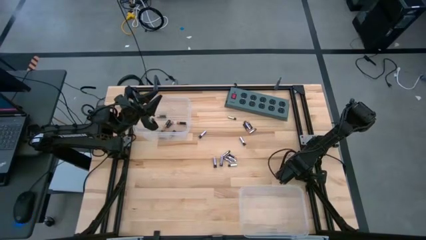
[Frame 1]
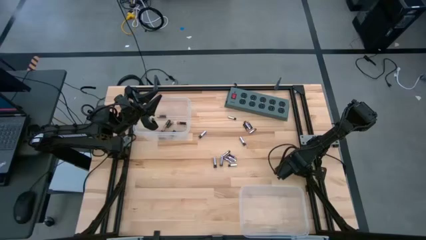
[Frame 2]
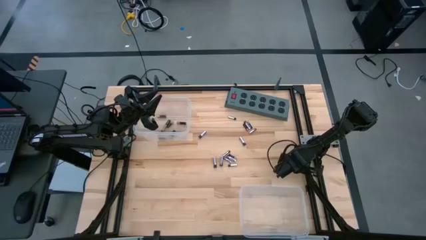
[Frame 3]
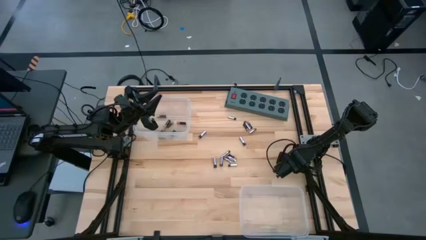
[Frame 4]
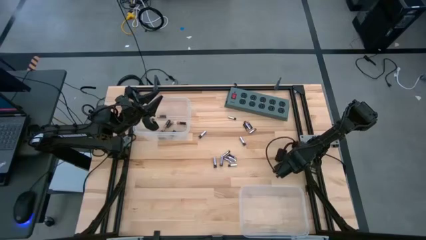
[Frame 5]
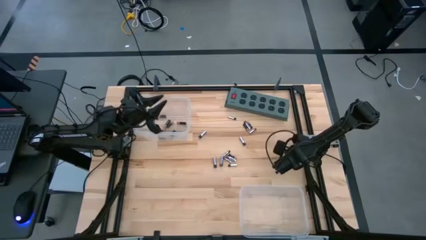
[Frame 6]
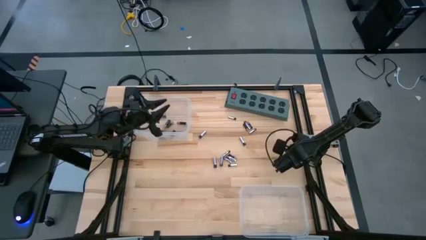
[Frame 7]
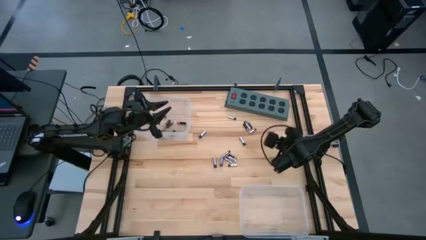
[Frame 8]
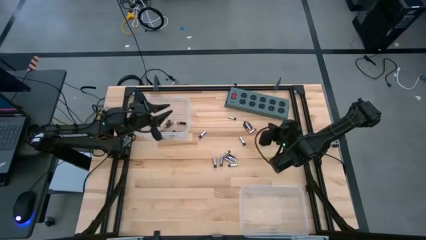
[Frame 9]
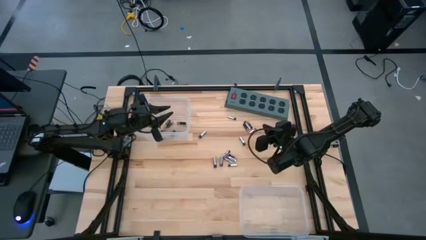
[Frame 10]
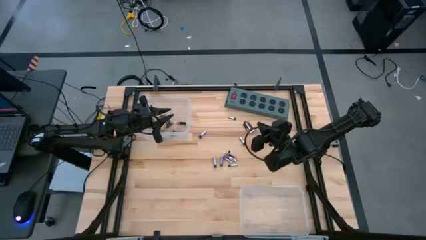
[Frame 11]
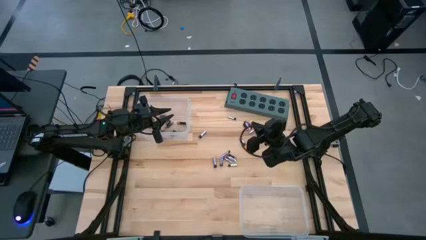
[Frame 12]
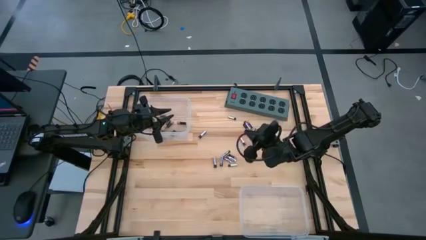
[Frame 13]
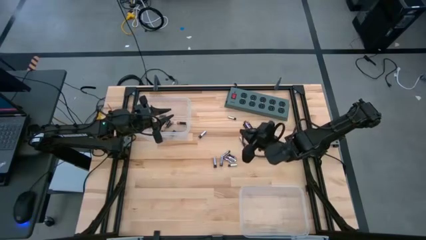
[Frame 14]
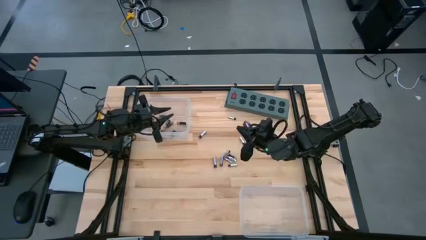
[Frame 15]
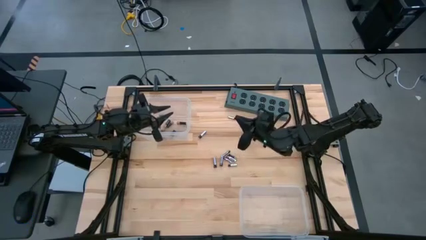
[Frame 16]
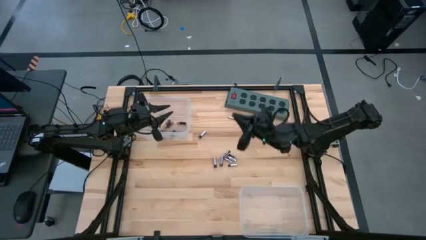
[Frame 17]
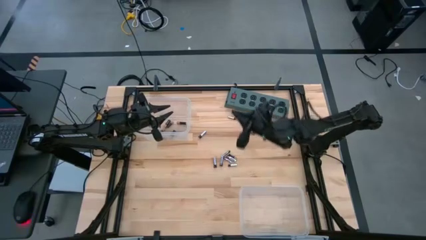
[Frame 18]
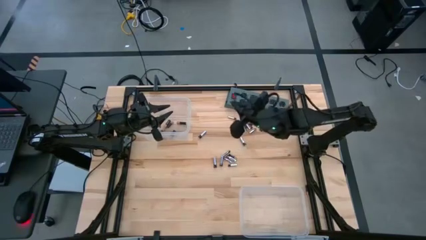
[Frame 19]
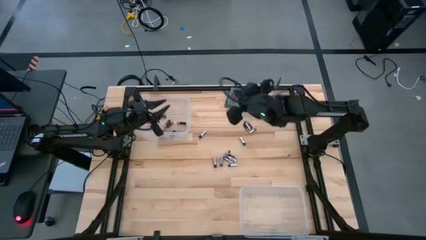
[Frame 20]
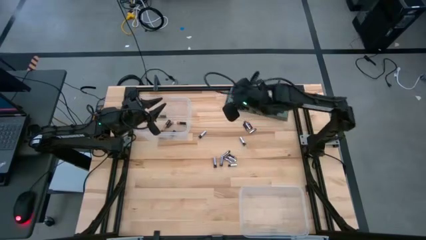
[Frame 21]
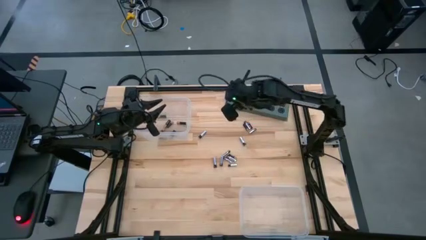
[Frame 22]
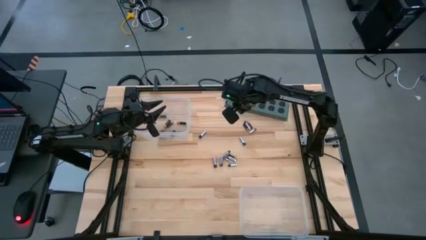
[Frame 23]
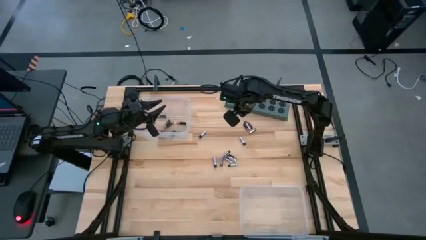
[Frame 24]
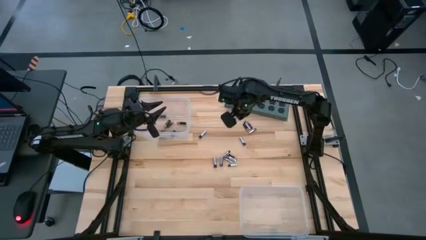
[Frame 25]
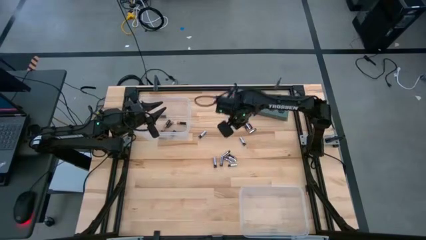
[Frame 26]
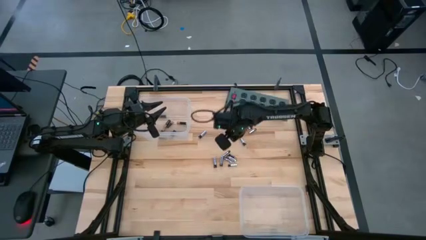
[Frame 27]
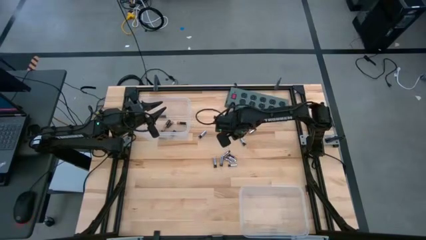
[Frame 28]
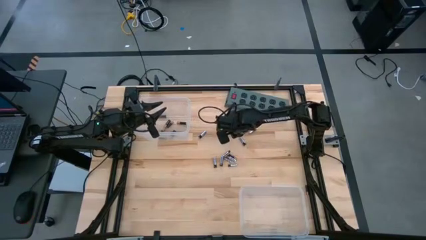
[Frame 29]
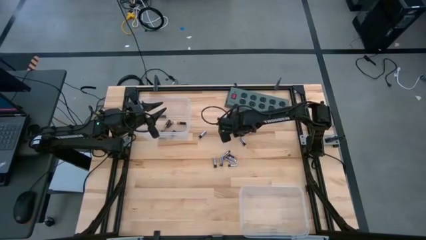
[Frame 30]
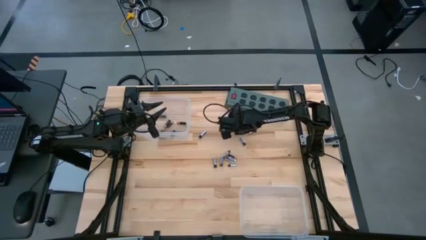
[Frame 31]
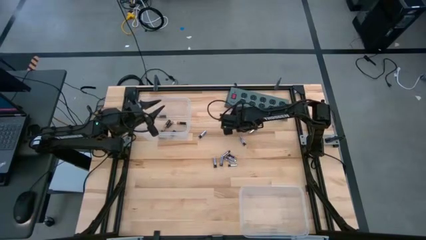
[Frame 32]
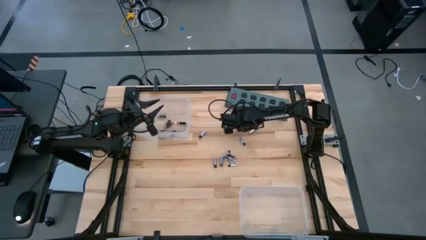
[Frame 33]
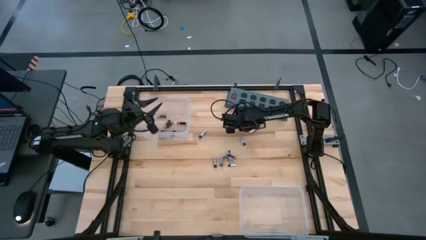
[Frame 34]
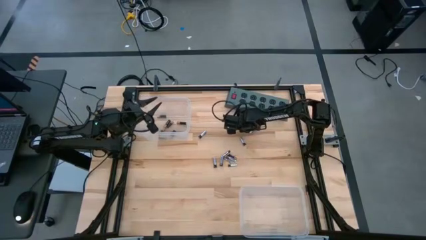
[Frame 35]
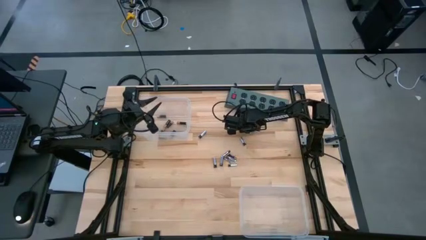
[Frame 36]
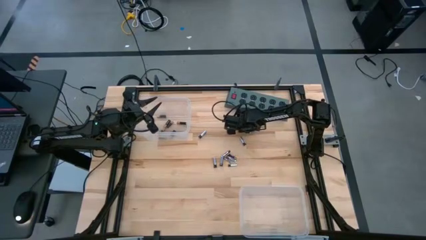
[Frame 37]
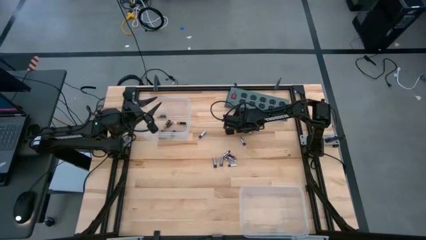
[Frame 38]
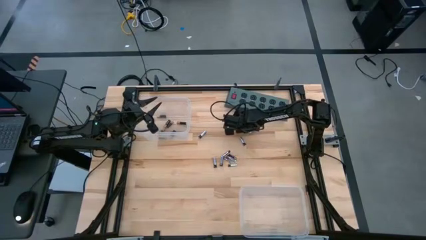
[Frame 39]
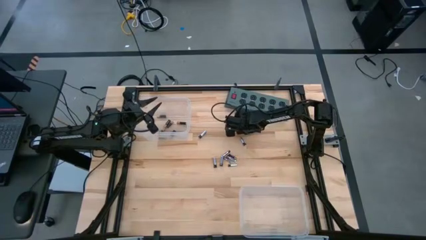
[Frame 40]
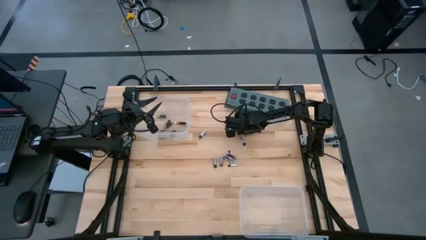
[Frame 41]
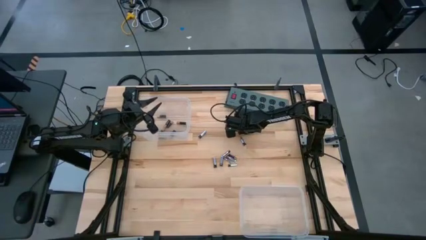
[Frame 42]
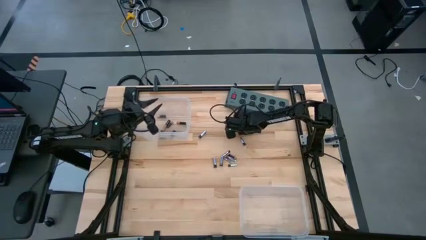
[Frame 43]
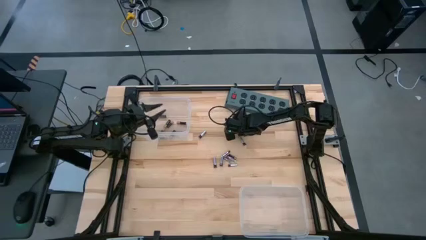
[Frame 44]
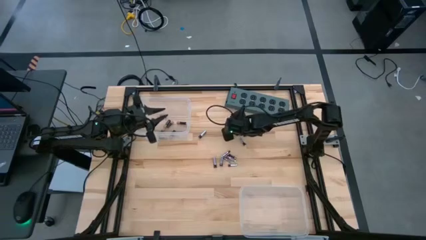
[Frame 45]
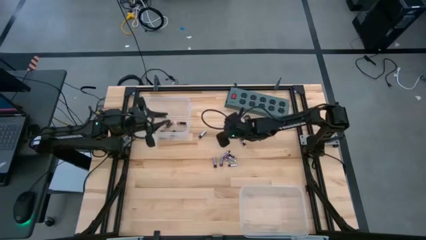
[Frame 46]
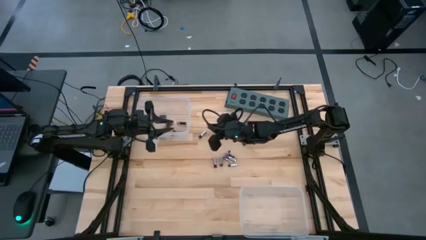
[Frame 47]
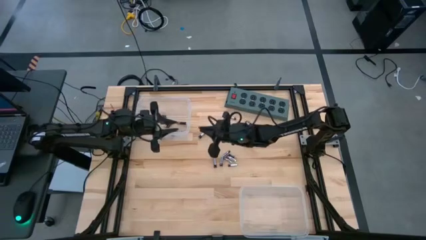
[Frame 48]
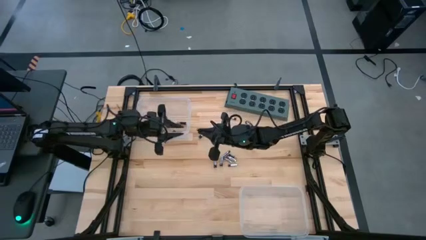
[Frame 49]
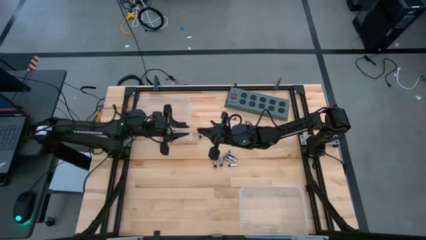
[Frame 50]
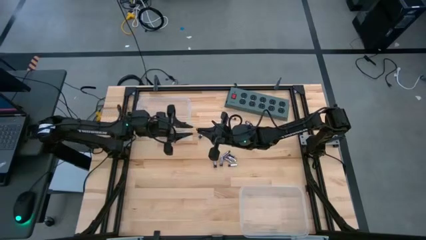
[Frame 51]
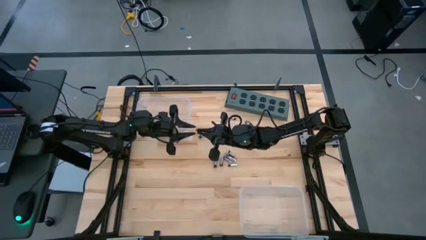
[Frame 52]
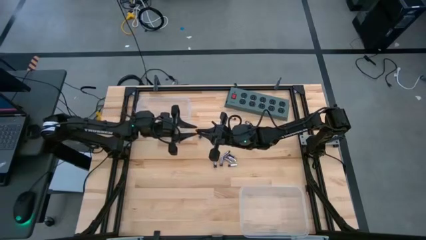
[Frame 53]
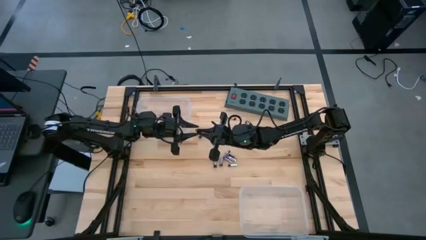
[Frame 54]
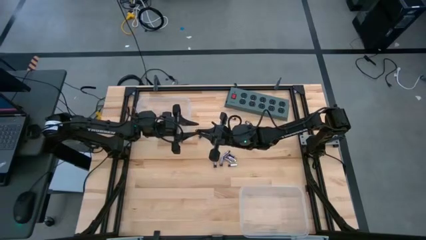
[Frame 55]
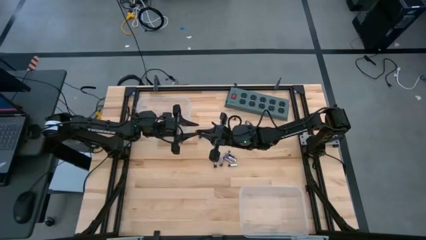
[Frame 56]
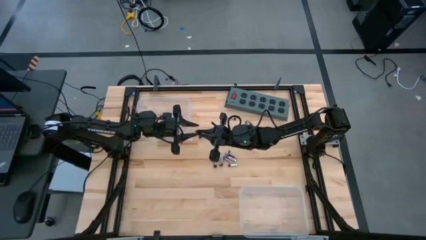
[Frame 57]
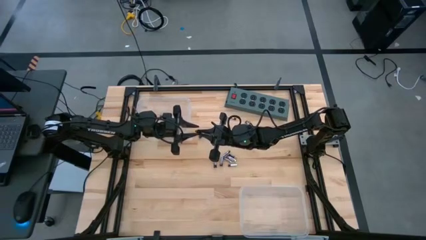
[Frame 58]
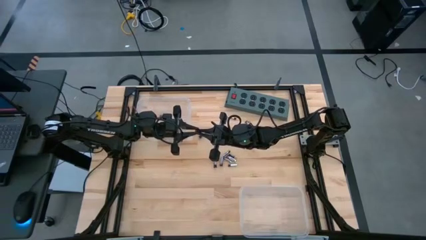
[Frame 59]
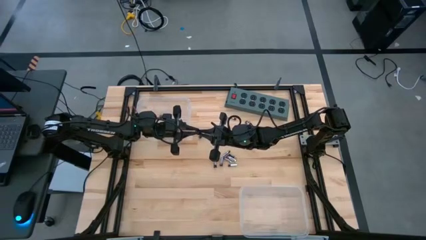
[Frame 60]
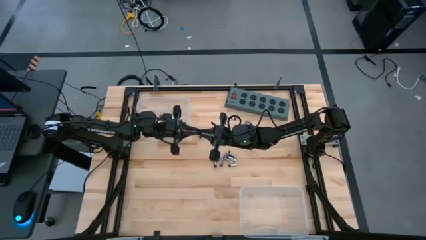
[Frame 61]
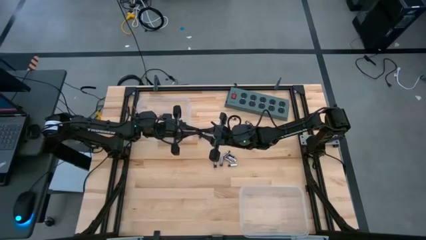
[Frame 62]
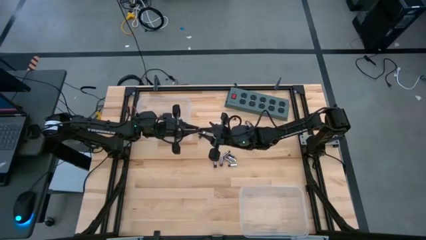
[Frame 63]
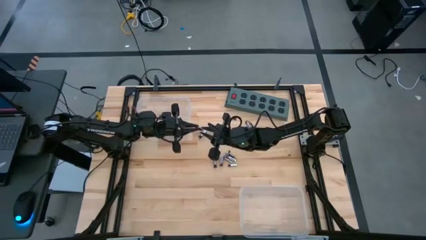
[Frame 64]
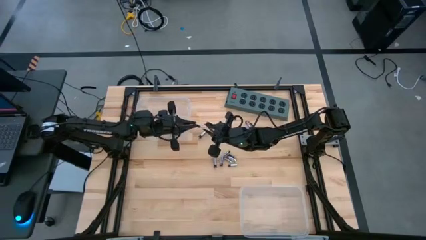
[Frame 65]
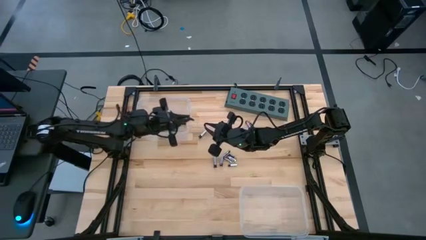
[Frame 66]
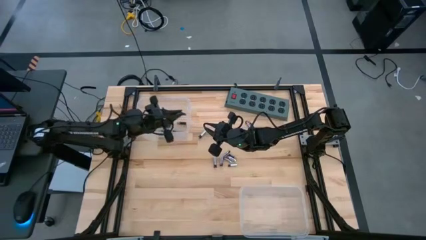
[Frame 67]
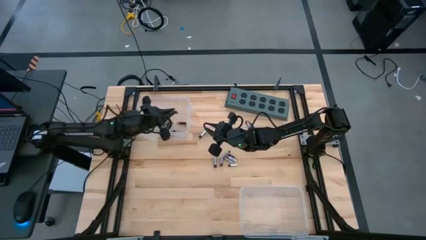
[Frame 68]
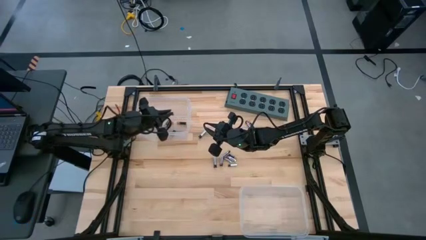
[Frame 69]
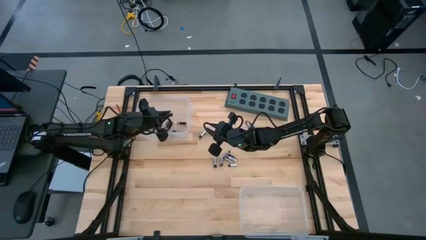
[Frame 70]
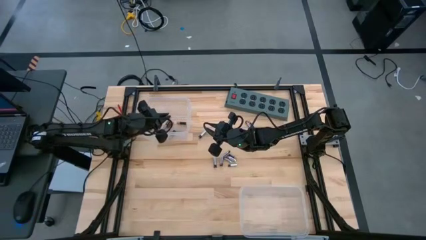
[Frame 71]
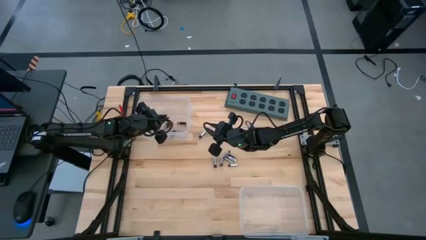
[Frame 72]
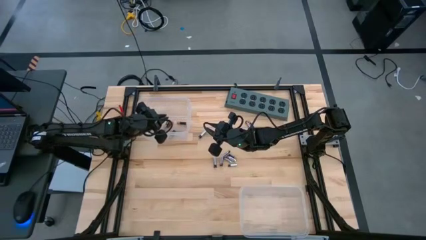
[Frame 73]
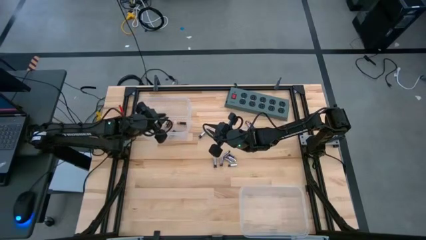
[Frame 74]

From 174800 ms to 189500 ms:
Task: Sort batteries
Put the black battery into the top transparent bin
